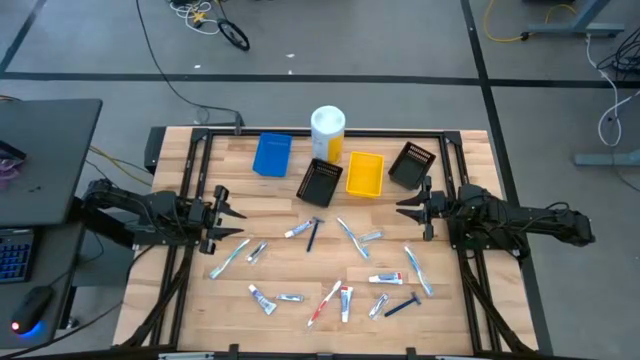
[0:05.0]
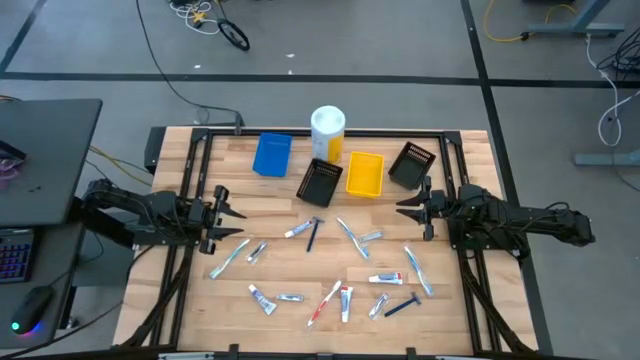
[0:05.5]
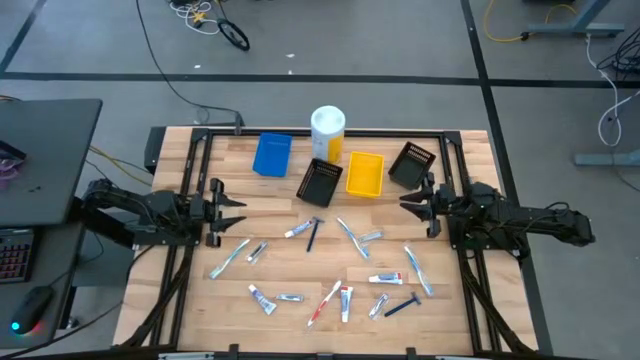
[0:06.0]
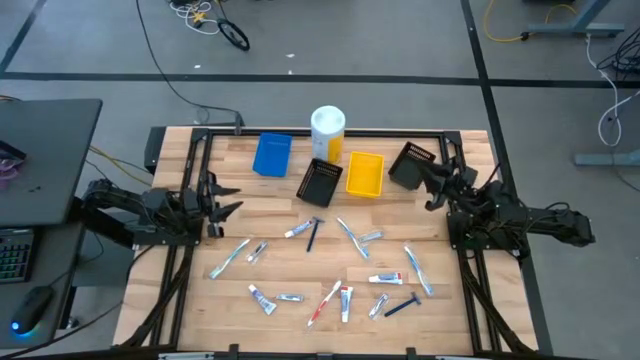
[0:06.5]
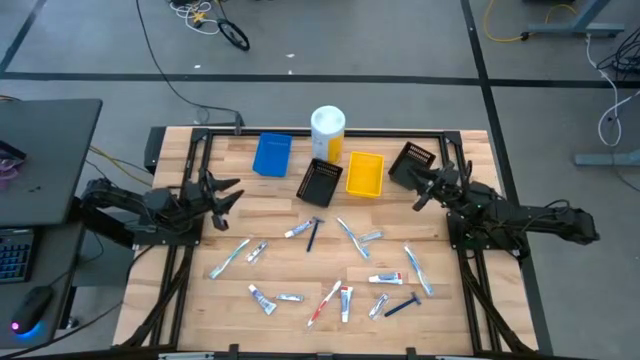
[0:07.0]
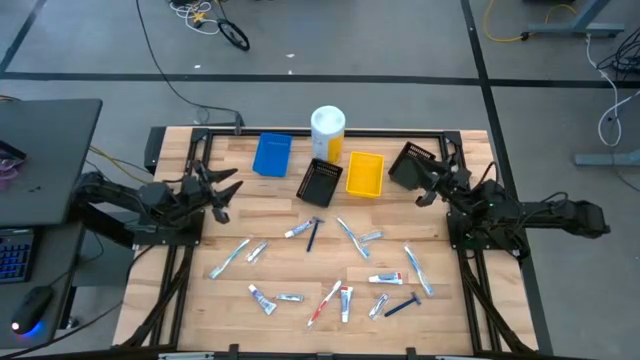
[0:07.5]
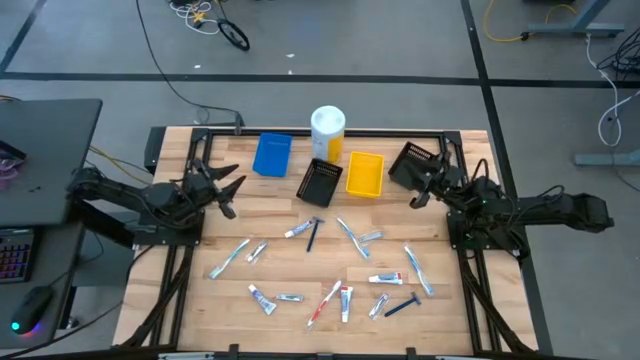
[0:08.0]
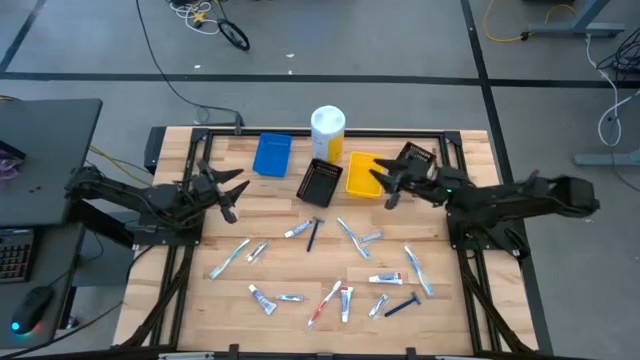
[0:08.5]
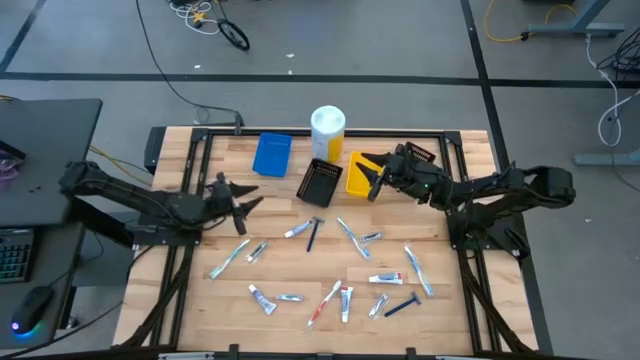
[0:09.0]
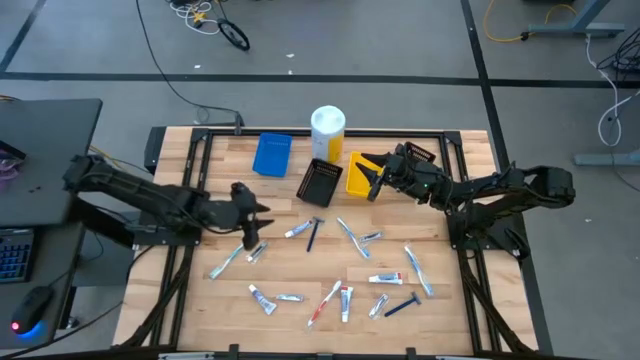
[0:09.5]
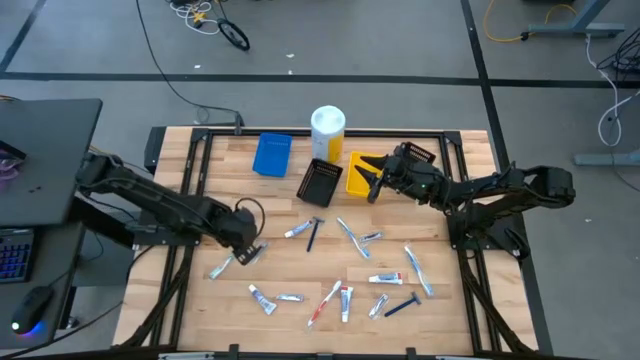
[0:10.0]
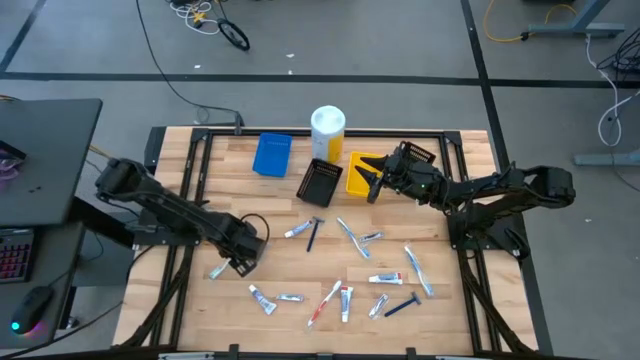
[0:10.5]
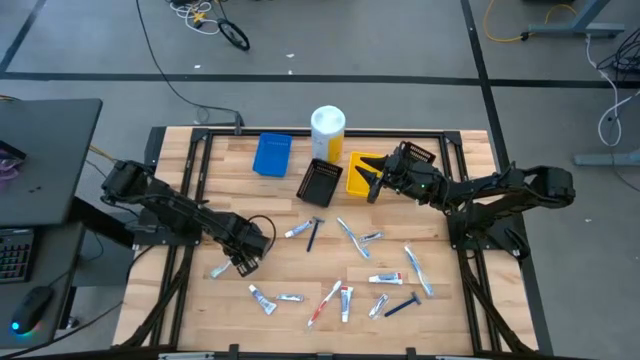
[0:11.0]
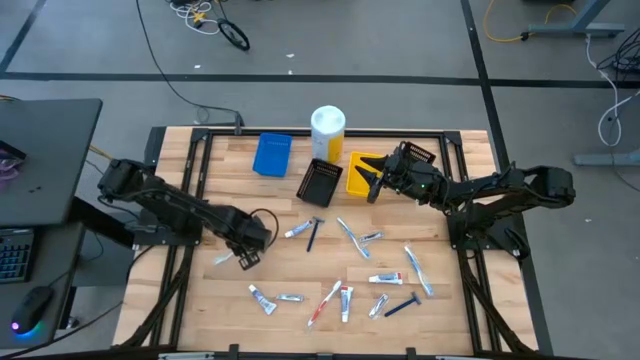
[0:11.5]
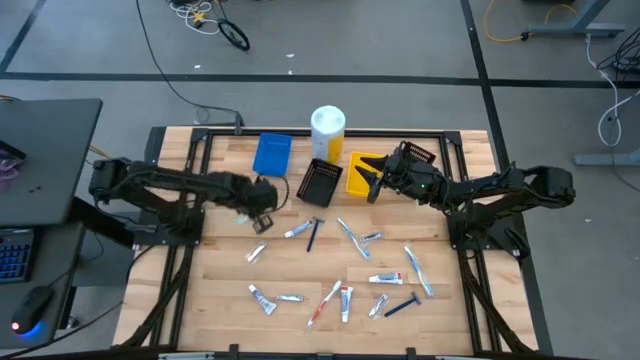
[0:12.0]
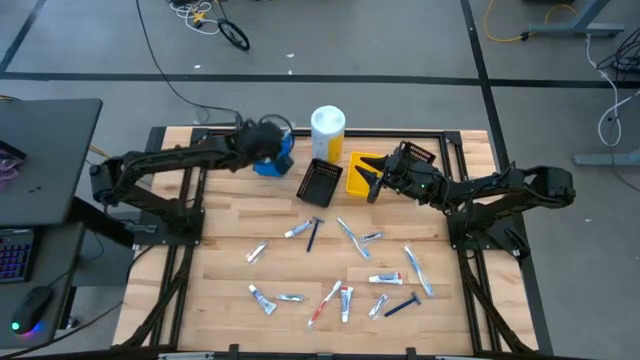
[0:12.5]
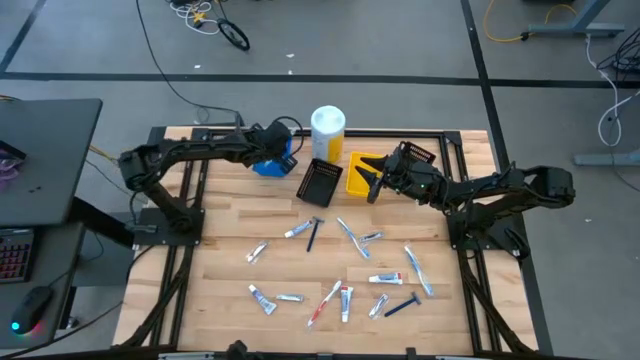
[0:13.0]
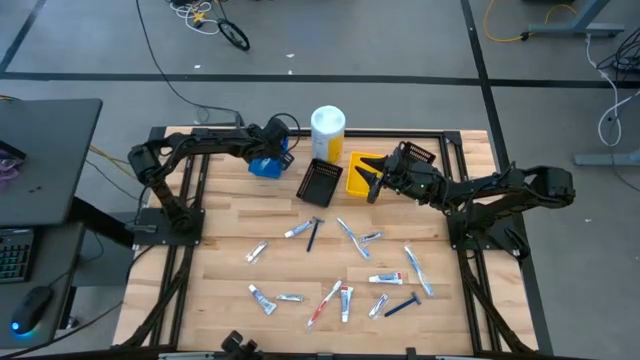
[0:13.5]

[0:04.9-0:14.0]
Task: Pick & Place Travel size toiletries
Put the green toothbrush into the blue bin

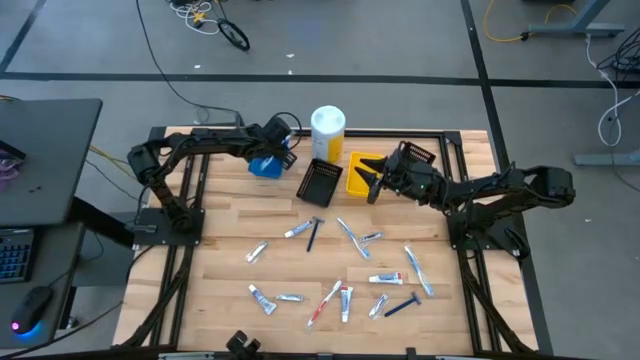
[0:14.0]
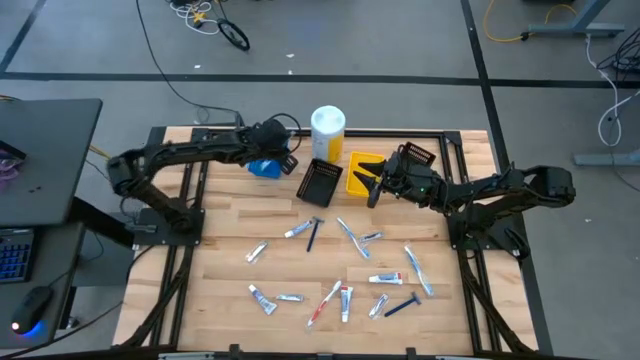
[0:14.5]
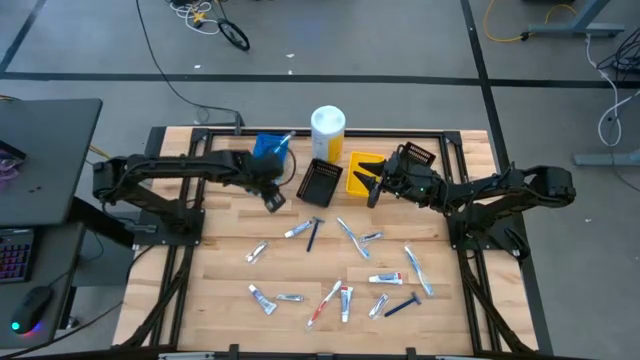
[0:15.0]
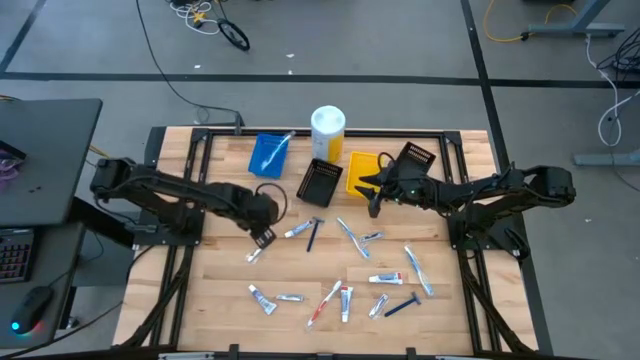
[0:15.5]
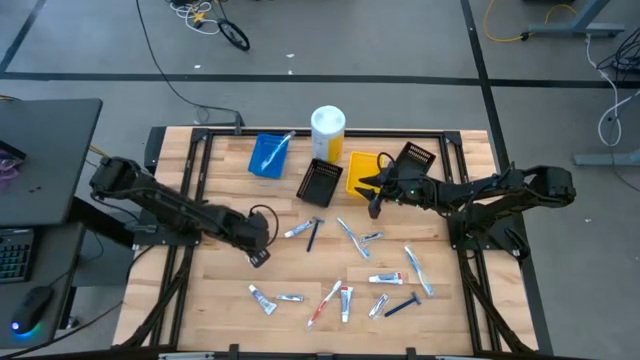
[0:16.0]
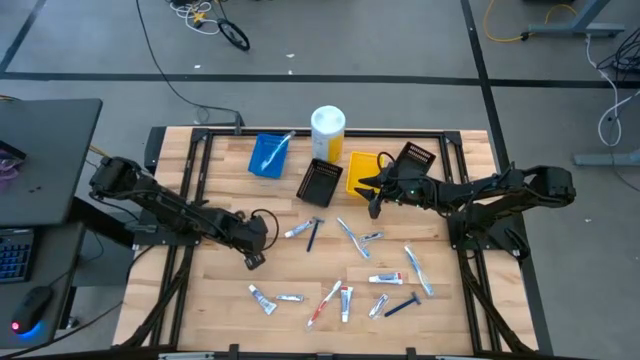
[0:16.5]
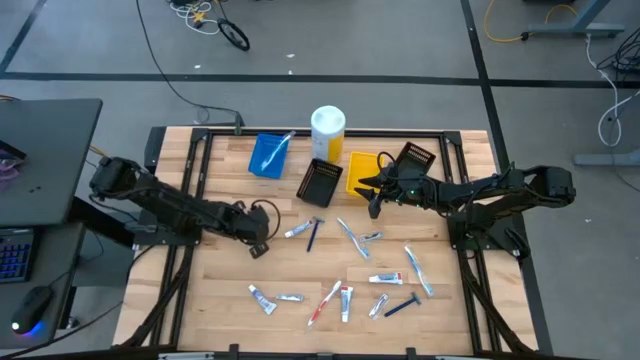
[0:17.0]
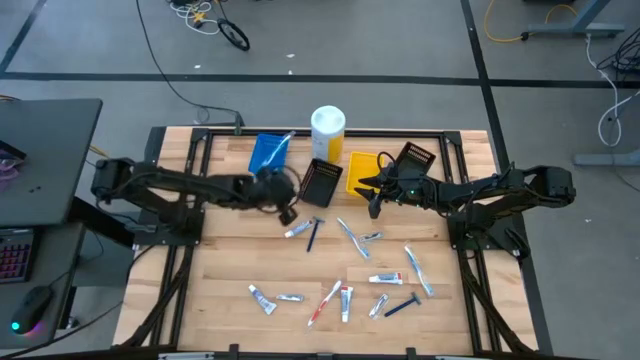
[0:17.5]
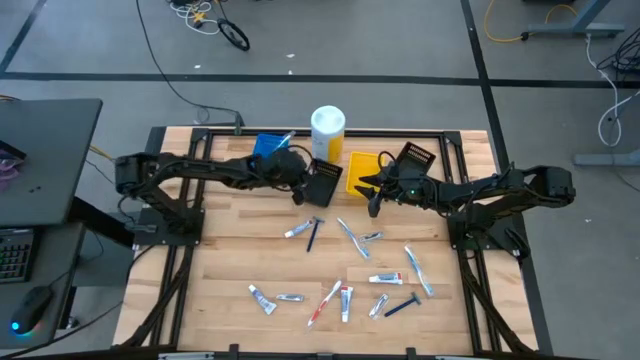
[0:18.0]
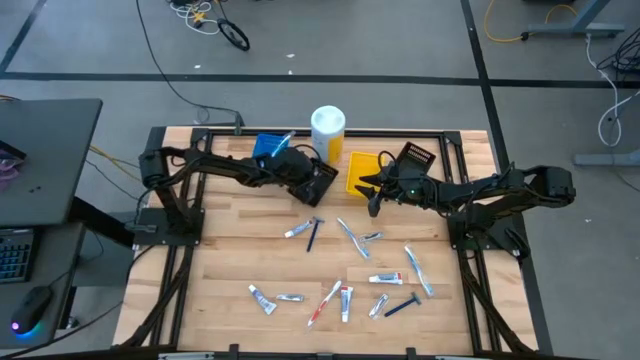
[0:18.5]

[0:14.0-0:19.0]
Put the silver nail cutter into the left black bin

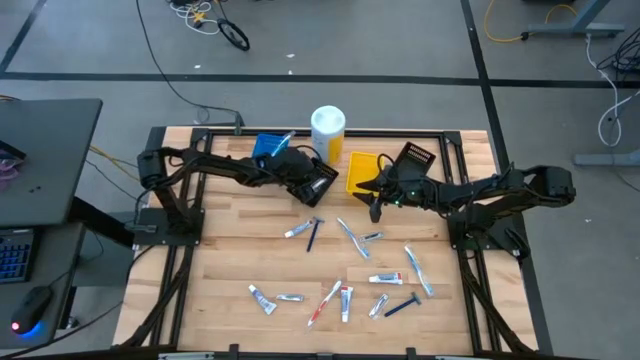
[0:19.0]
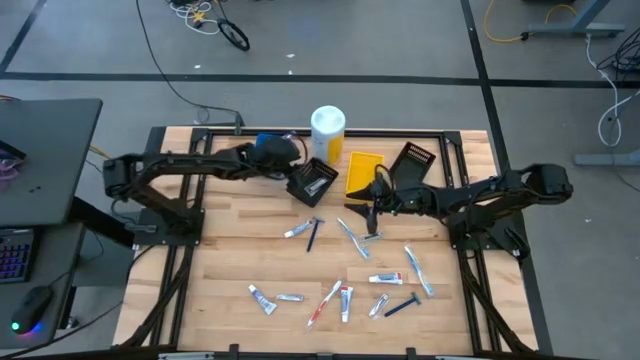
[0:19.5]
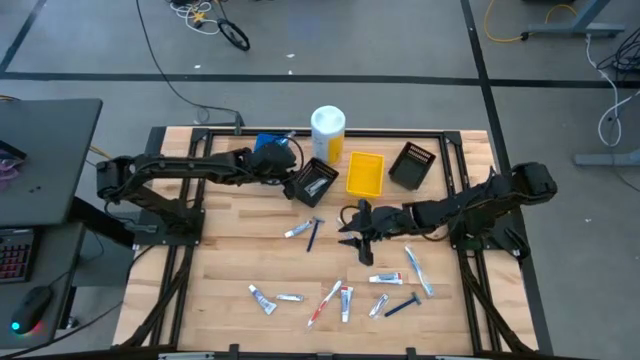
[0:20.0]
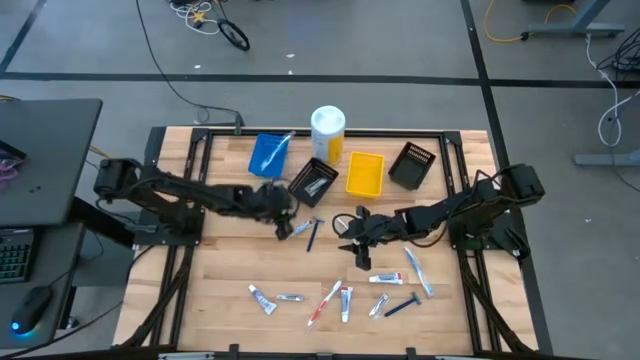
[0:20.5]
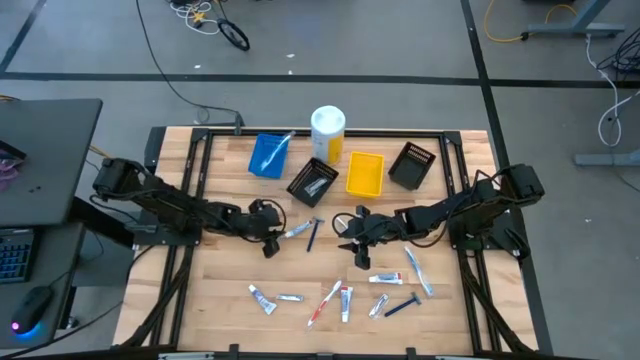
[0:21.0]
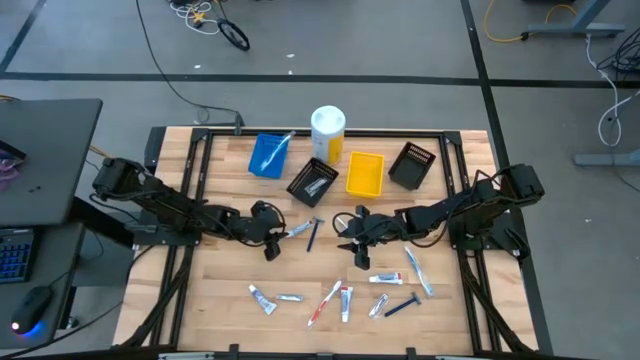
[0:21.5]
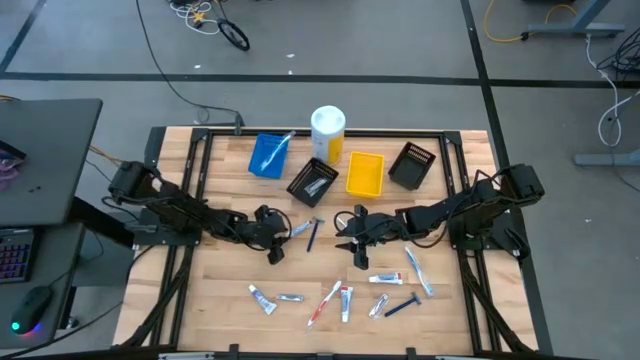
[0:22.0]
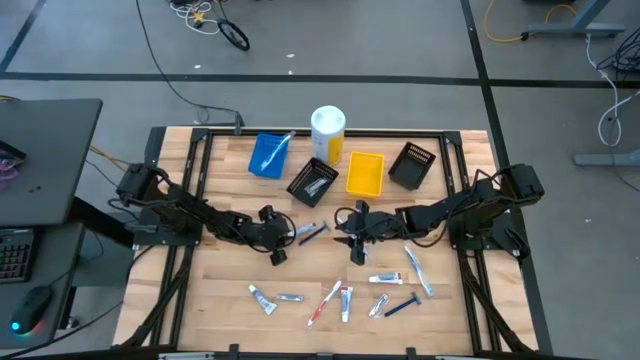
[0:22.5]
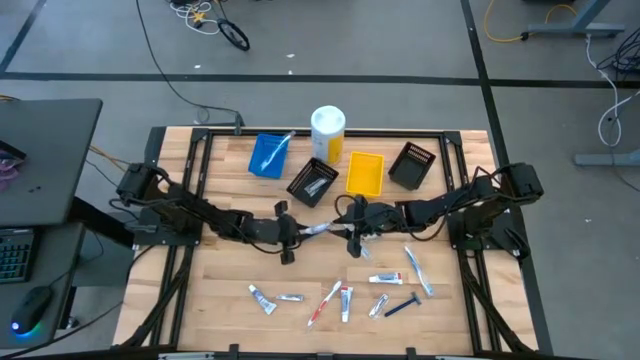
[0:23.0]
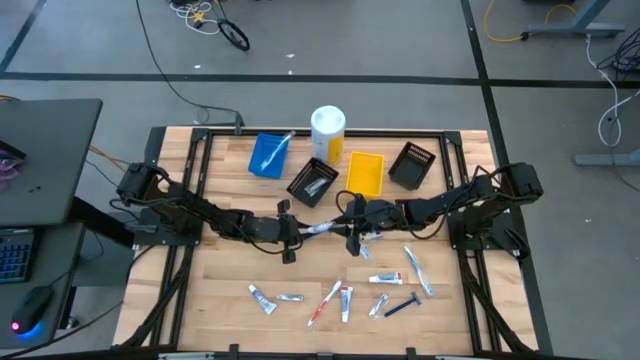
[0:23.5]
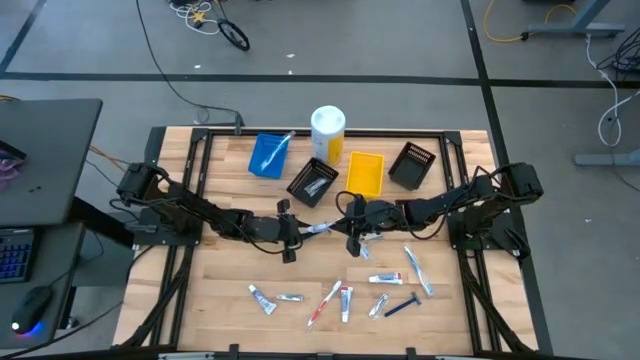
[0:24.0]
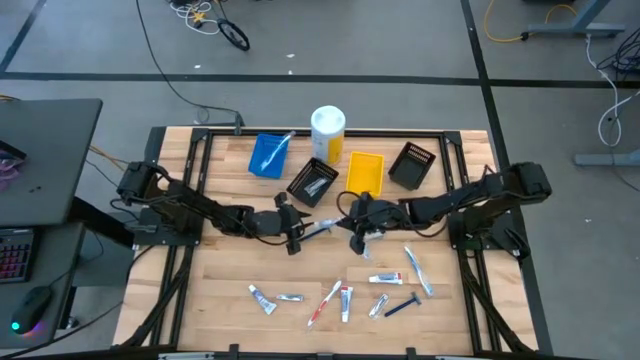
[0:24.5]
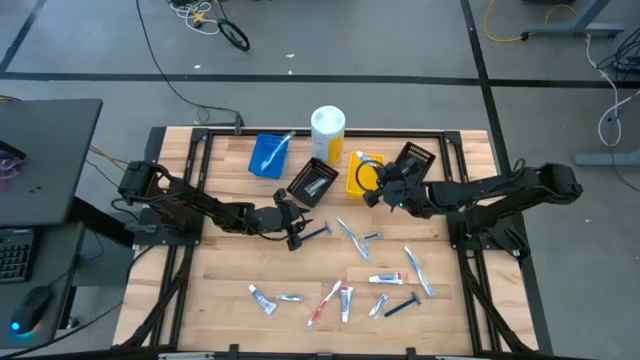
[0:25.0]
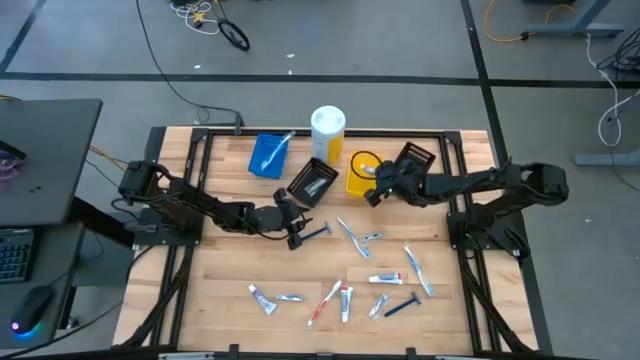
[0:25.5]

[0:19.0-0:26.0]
Put the toothpaste into the yellow bin

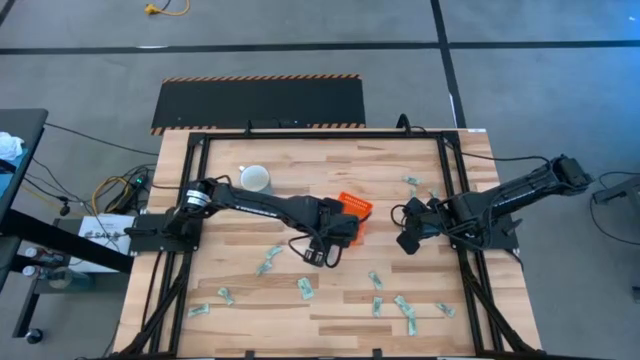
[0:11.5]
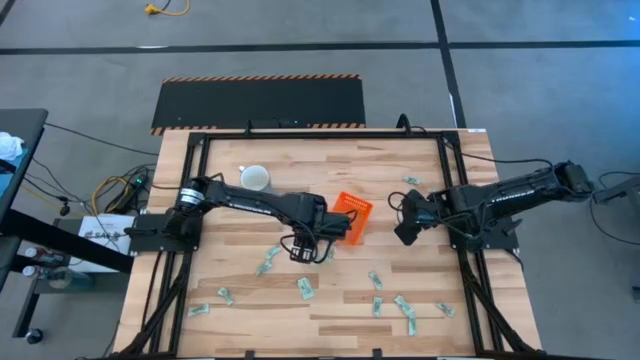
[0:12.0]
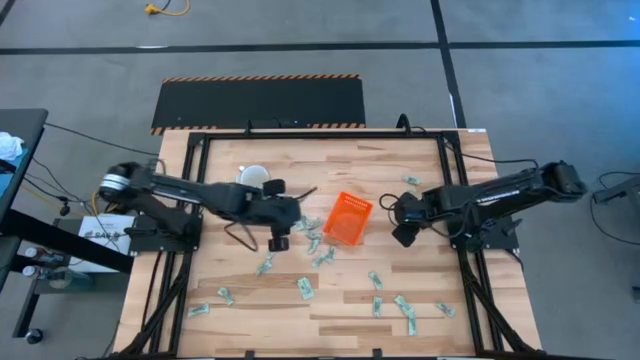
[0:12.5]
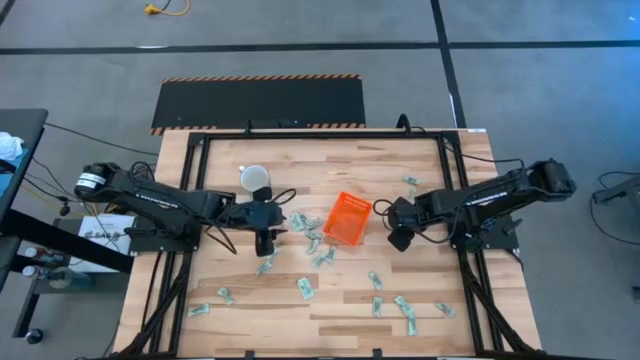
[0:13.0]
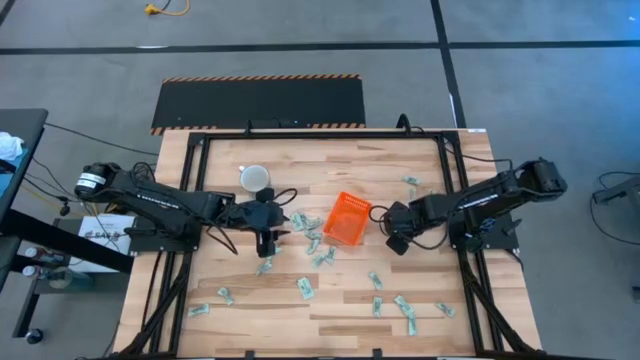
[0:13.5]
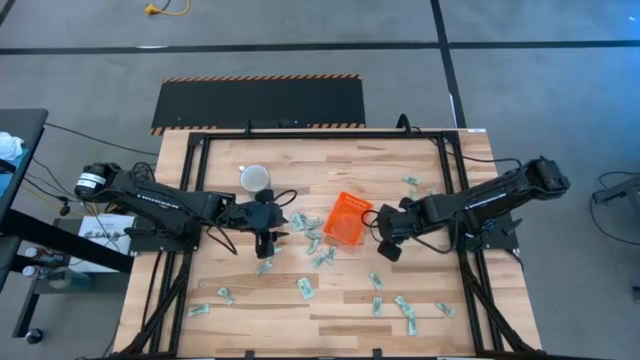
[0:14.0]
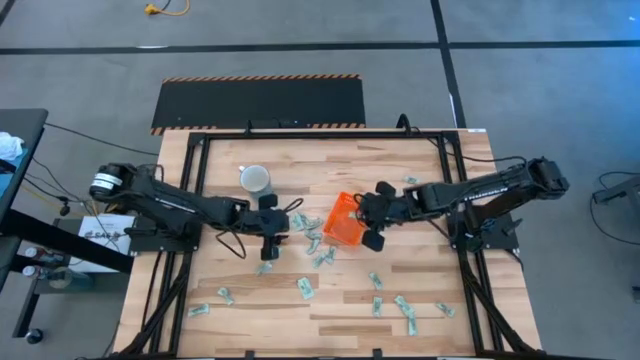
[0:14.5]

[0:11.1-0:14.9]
Task: Pick and place Stevia / Truvia into bins
Put the stevia packet into the basket
